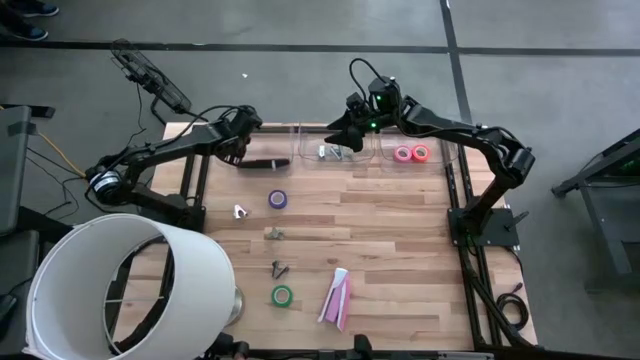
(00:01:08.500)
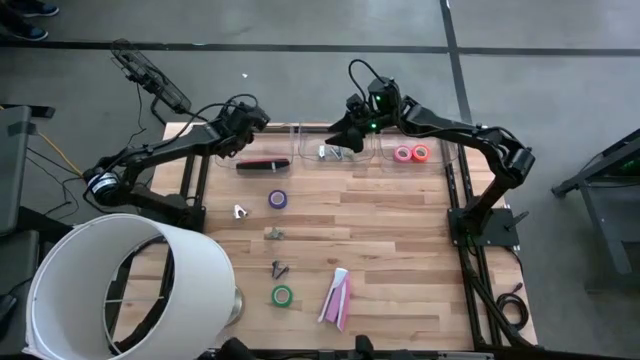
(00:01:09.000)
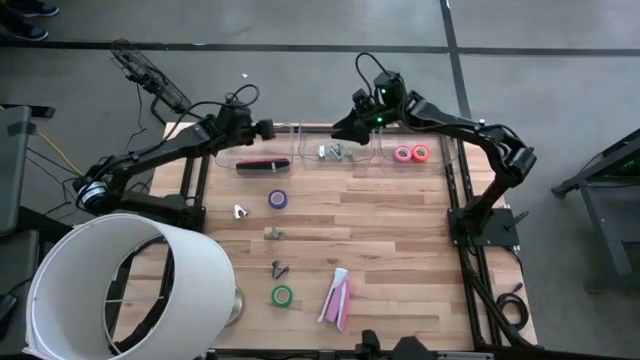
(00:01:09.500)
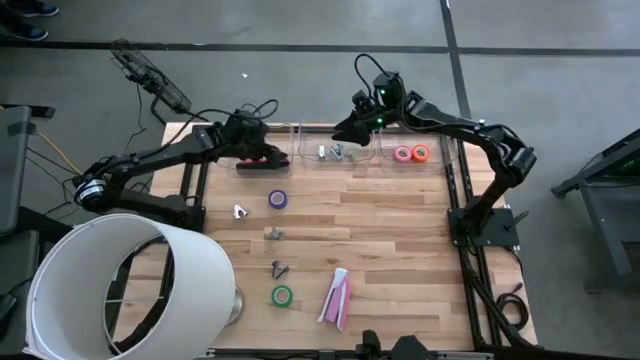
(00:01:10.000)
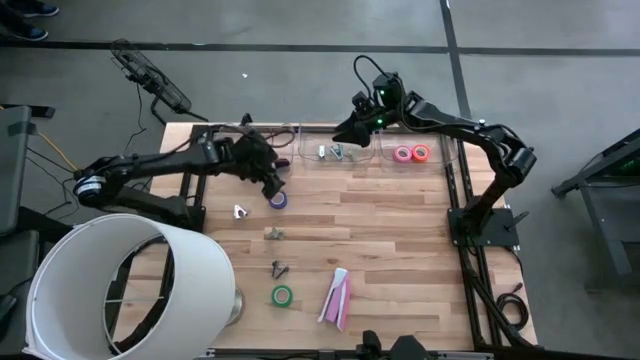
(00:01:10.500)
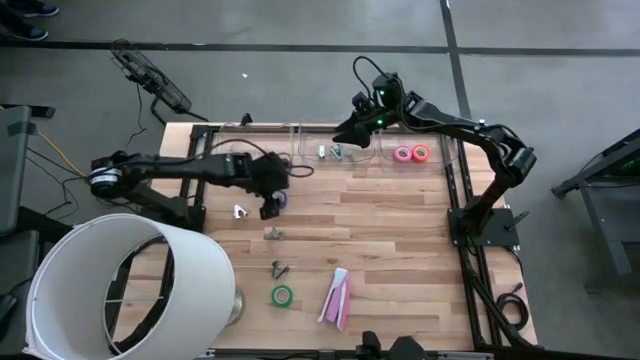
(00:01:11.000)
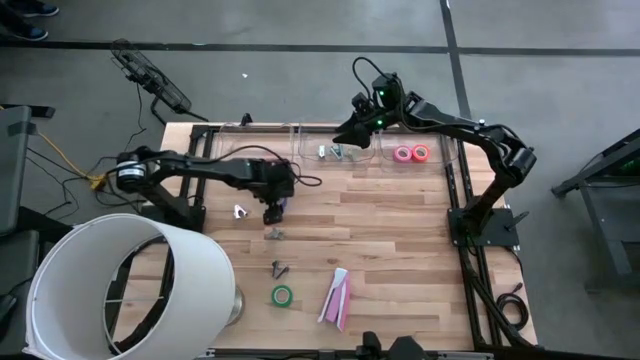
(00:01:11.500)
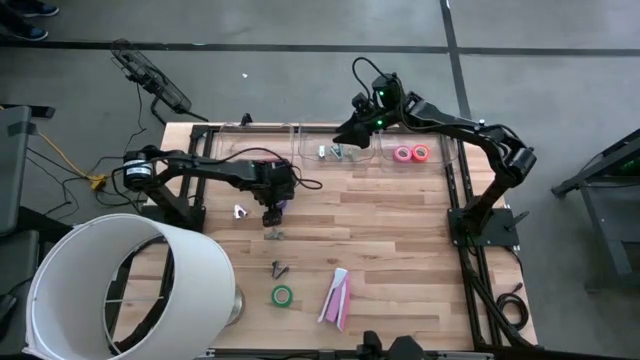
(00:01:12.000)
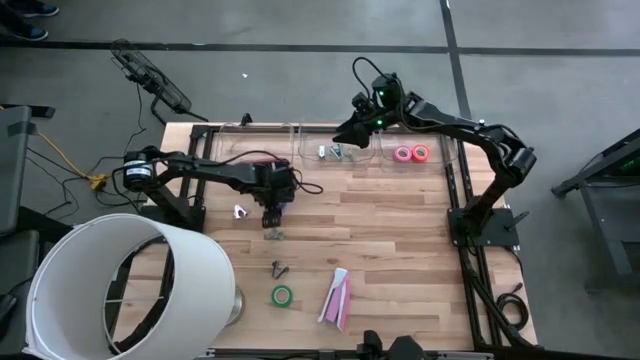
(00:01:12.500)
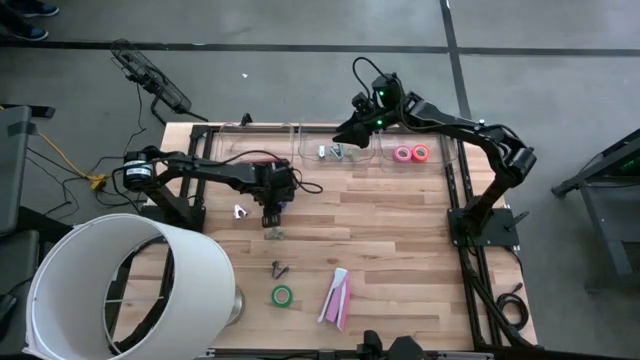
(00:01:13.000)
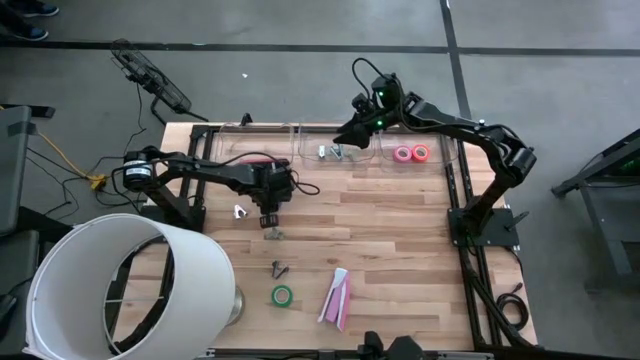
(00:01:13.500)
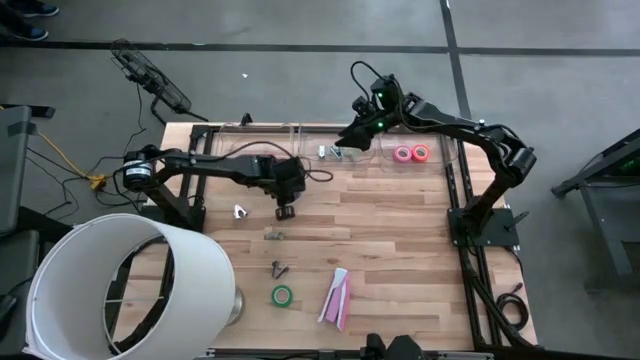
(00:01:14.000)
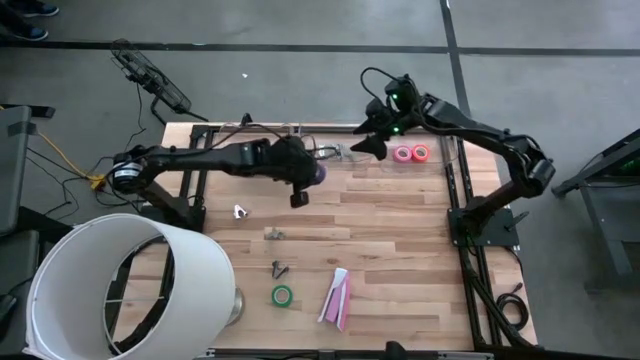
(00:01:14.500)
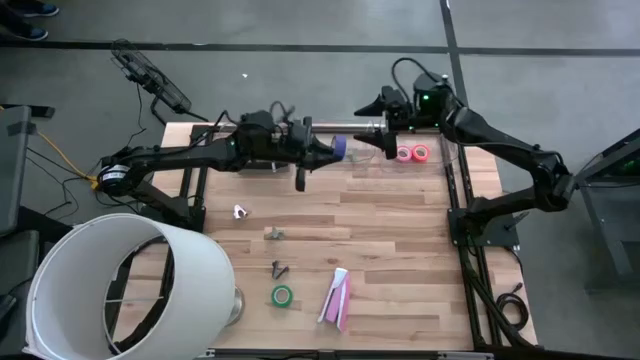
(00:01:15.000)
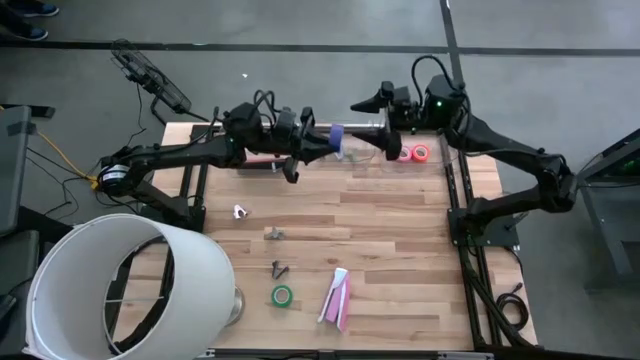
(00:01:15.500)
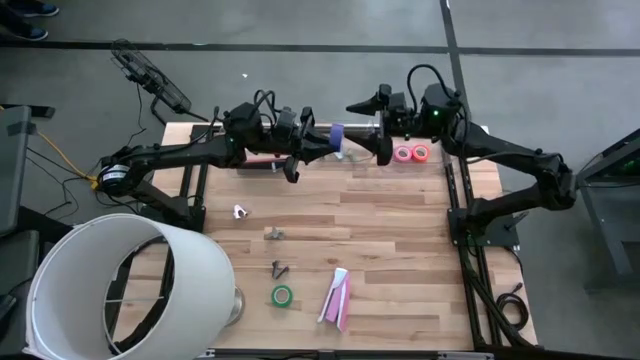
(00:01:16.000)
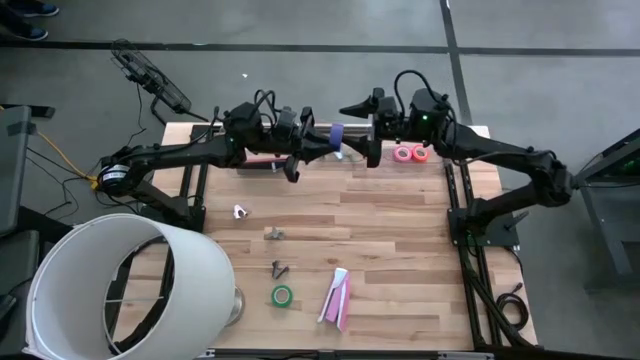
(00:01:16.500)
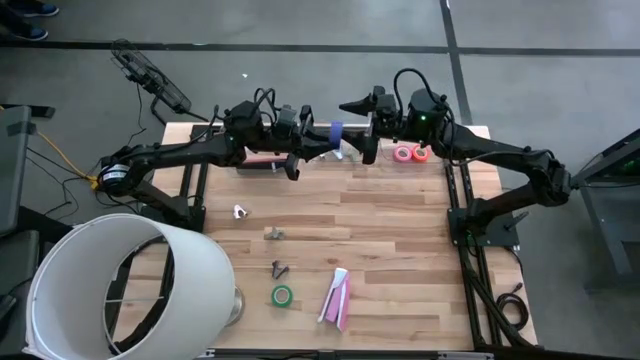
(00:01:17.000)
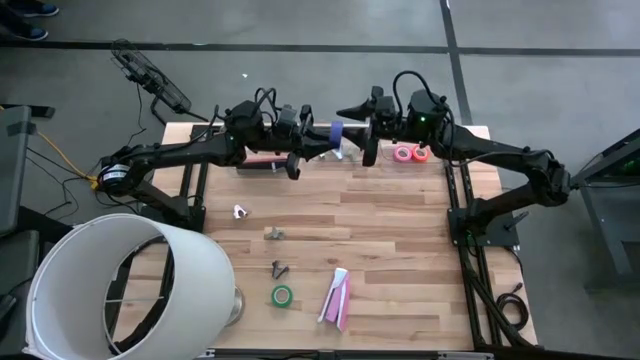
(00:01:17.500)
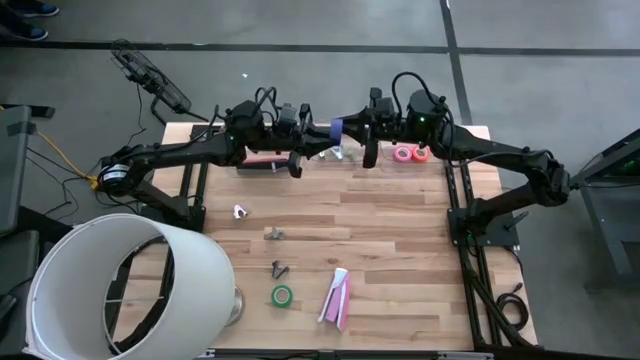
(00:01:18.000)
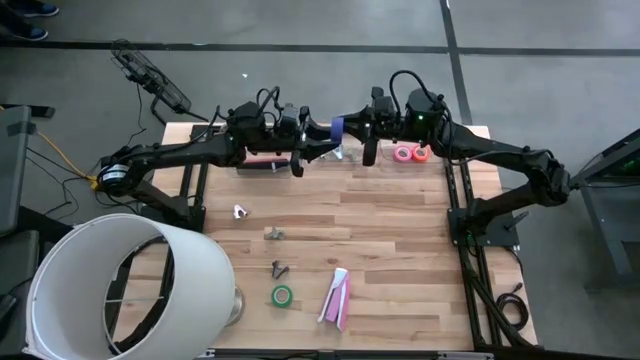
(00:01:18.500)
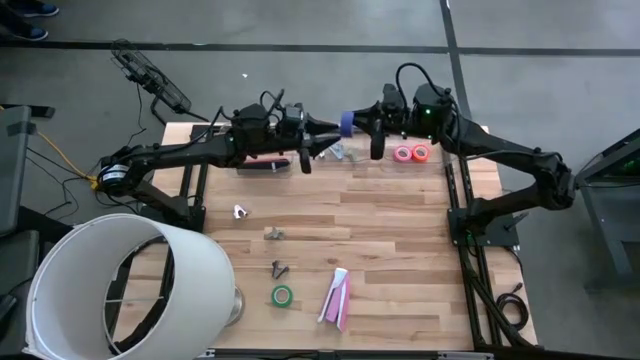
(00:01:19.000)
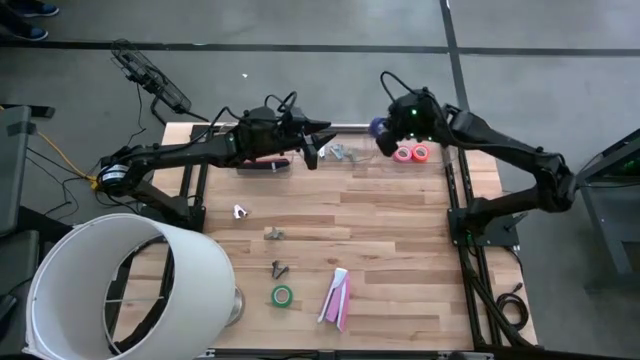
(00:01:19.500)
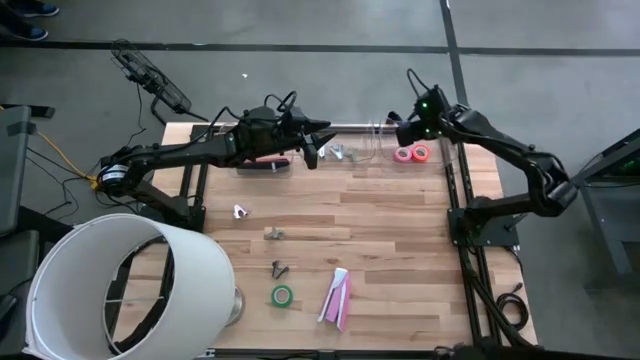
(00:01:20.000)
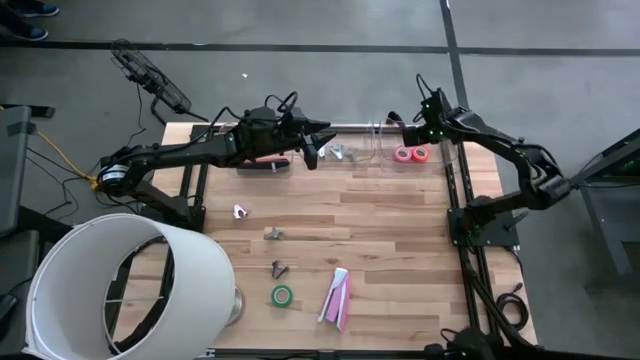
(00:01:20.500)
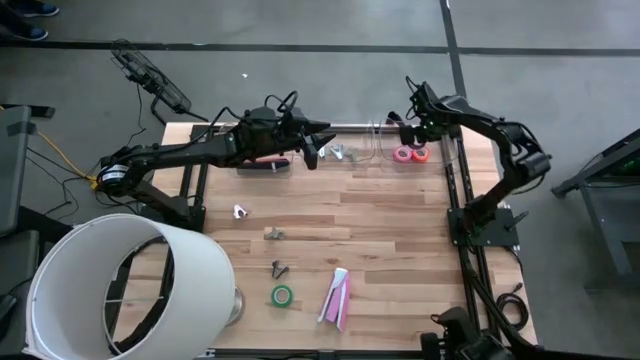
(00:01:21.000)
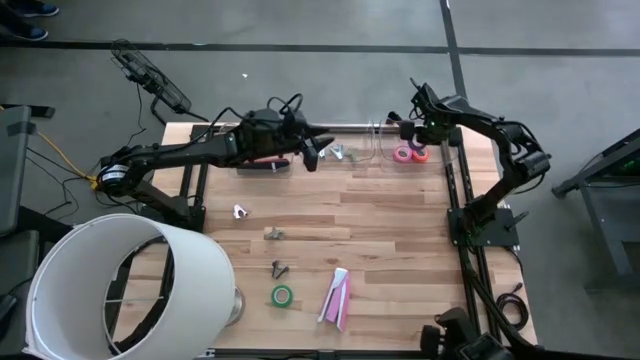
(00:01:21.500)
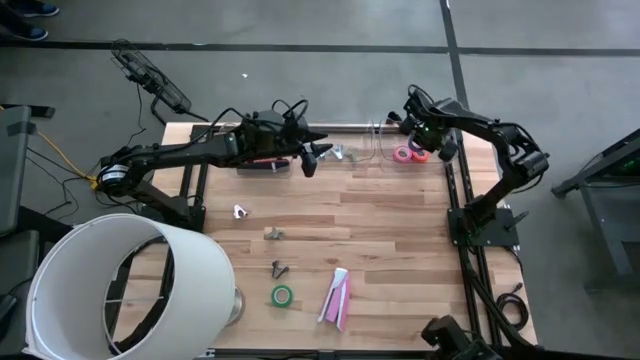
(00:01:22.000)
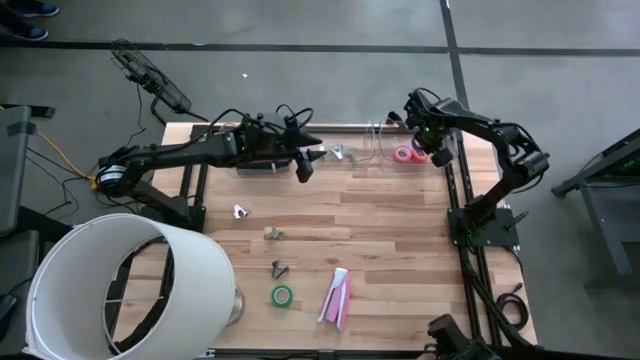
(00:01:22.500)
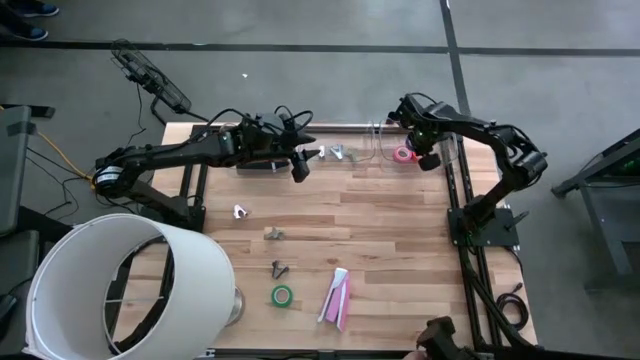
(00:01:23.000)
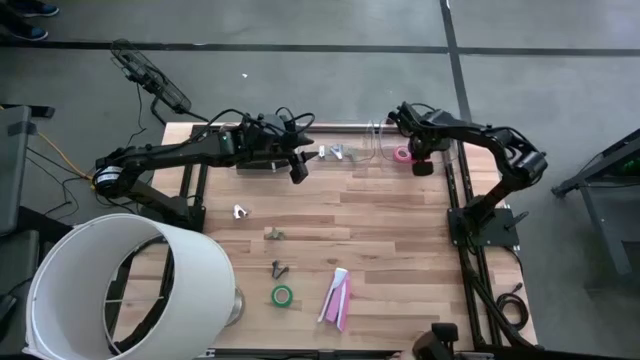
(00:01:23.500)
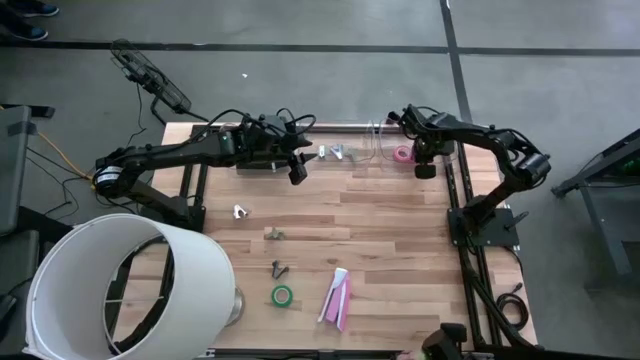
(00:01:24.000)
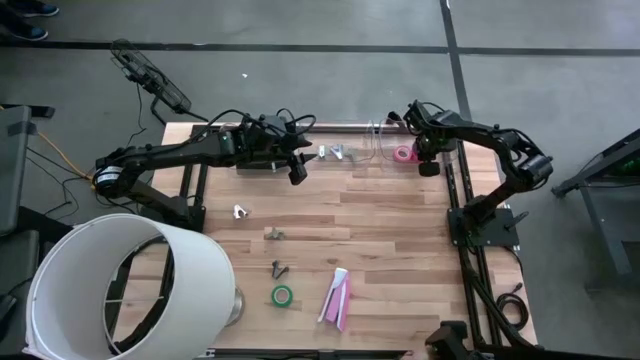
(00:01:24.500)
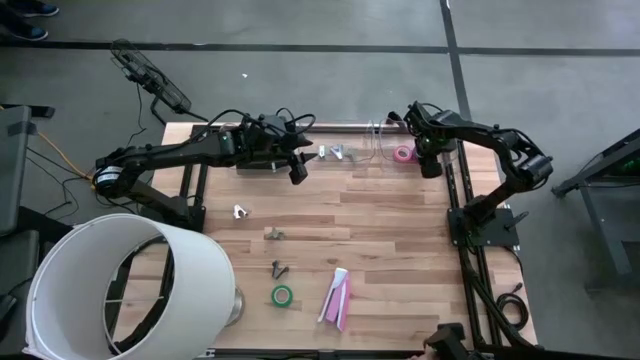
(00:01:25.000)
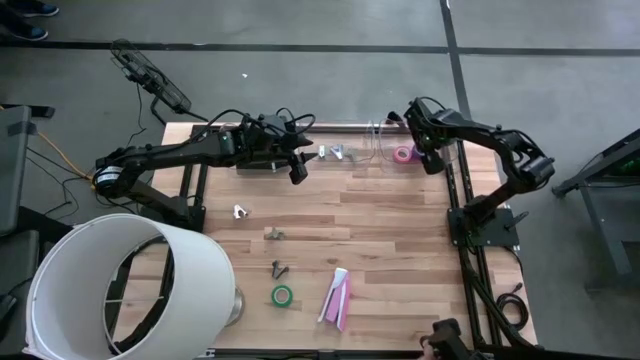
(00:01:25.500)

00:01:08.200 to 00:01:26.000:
Task: Pick and place Stapler, Stapler remover, tape
Put the violet tape into the right transparent bin
